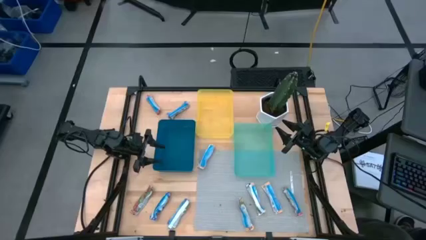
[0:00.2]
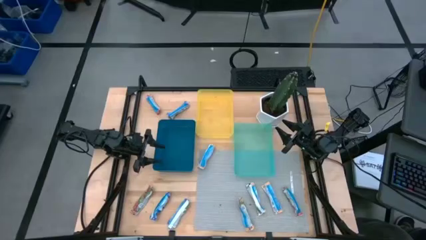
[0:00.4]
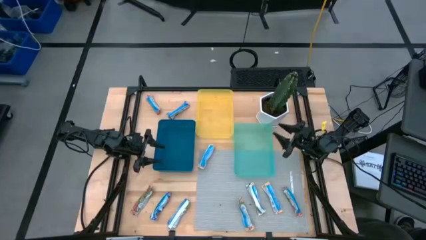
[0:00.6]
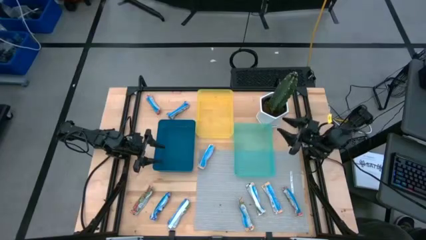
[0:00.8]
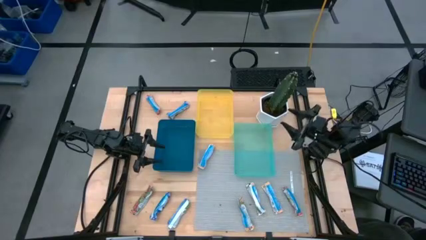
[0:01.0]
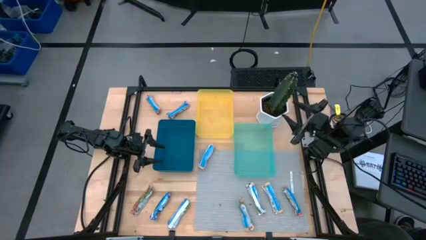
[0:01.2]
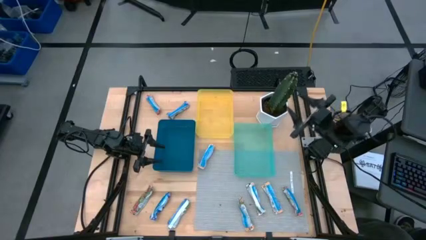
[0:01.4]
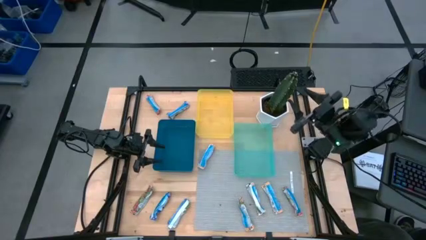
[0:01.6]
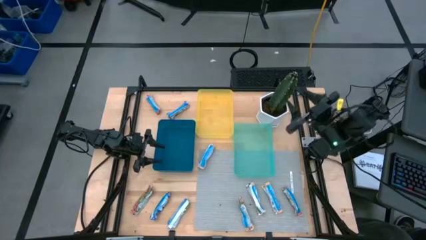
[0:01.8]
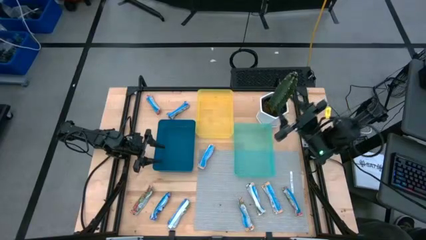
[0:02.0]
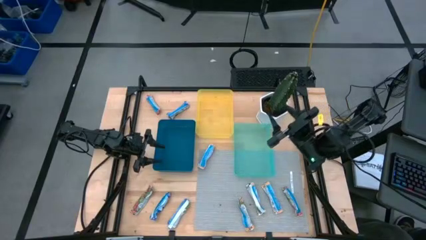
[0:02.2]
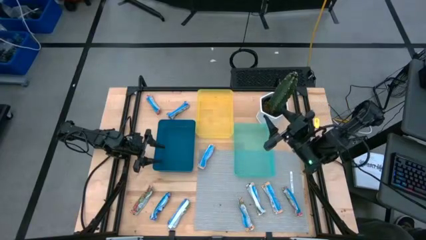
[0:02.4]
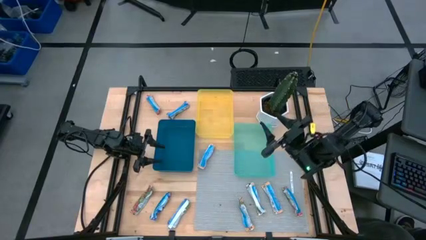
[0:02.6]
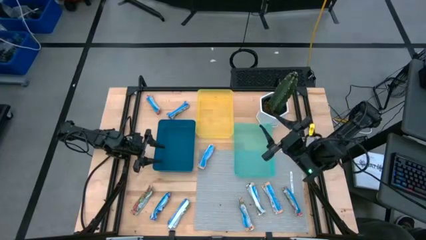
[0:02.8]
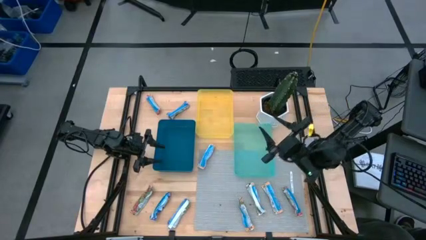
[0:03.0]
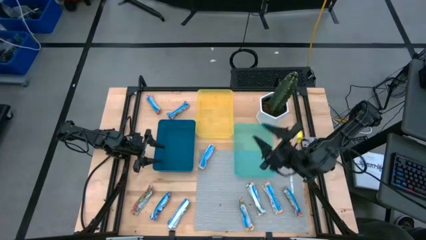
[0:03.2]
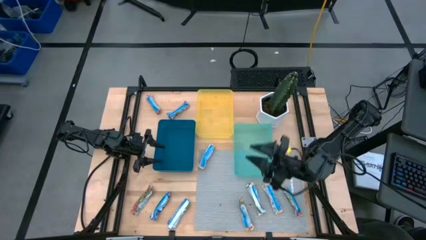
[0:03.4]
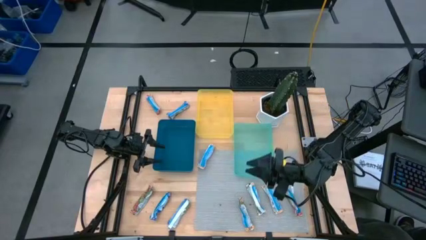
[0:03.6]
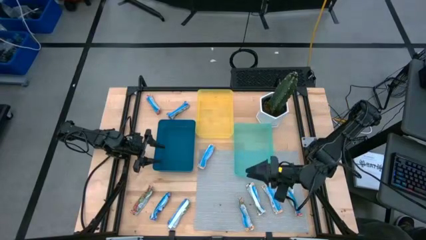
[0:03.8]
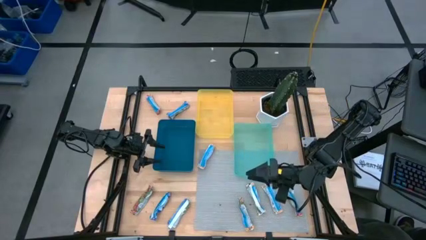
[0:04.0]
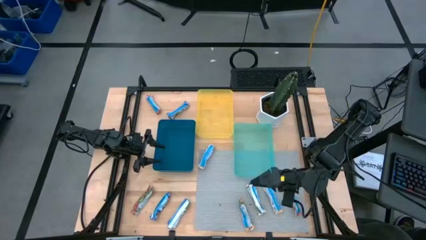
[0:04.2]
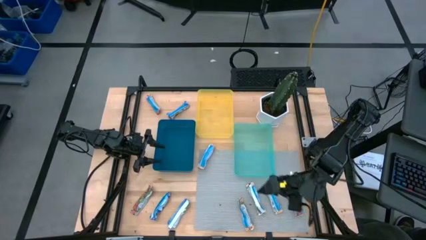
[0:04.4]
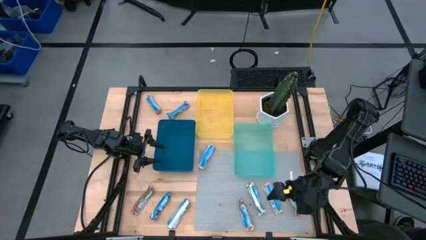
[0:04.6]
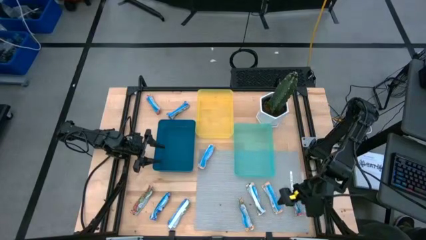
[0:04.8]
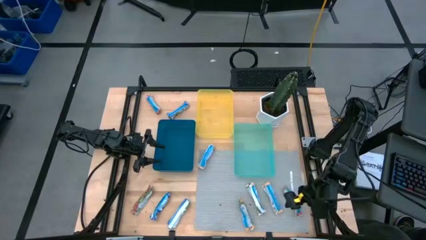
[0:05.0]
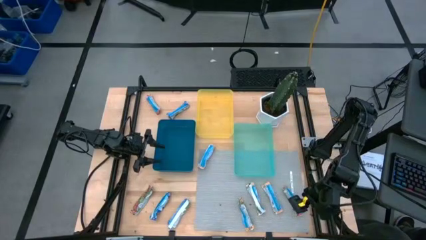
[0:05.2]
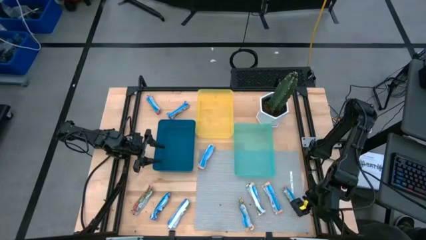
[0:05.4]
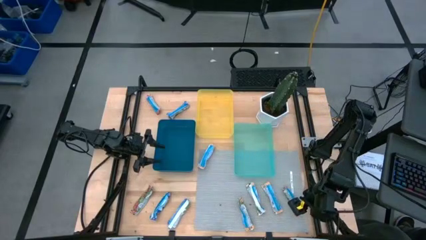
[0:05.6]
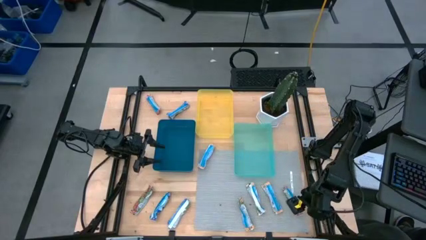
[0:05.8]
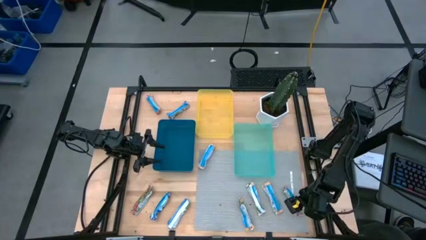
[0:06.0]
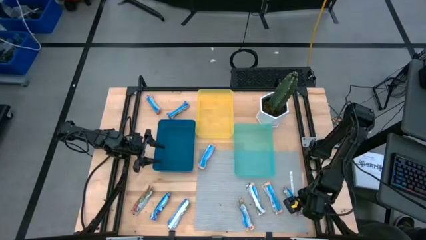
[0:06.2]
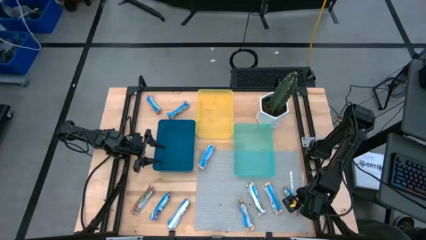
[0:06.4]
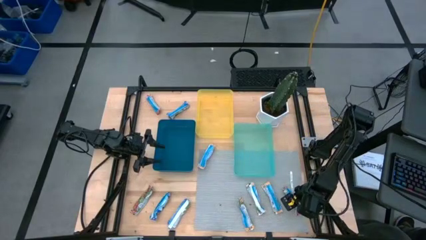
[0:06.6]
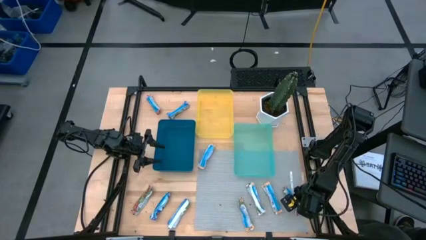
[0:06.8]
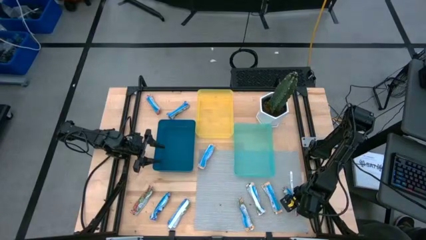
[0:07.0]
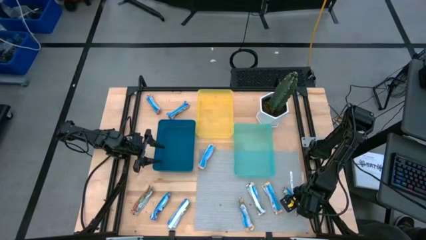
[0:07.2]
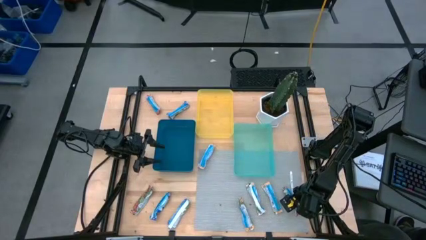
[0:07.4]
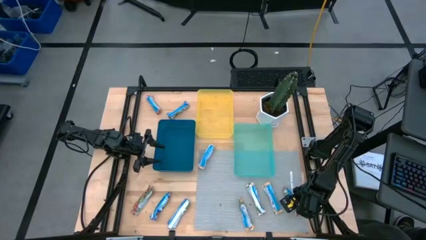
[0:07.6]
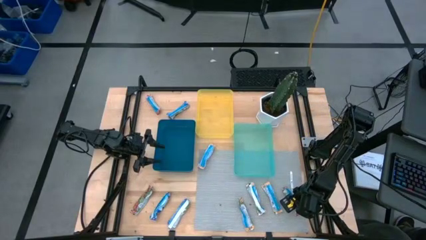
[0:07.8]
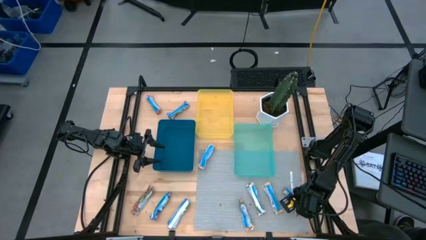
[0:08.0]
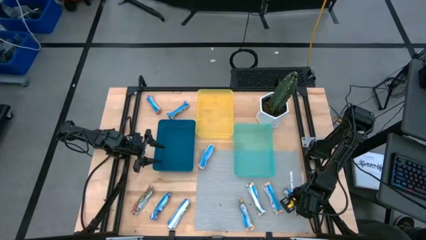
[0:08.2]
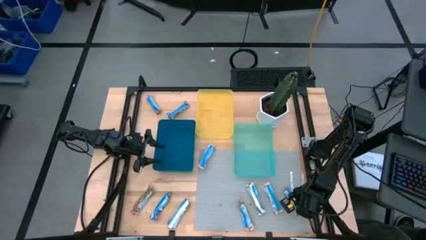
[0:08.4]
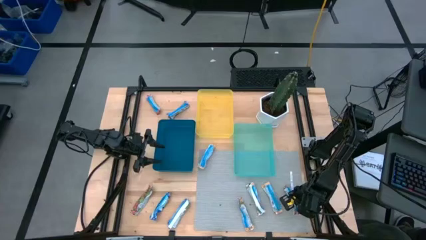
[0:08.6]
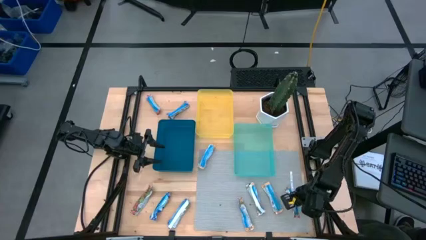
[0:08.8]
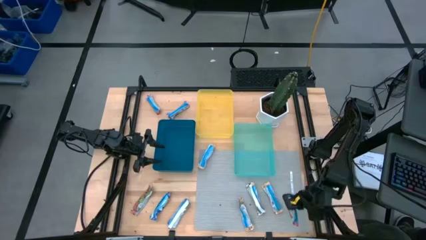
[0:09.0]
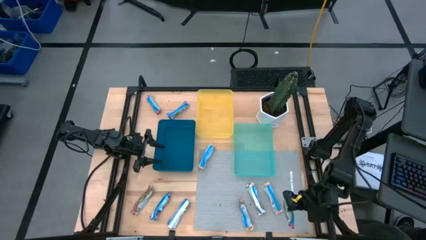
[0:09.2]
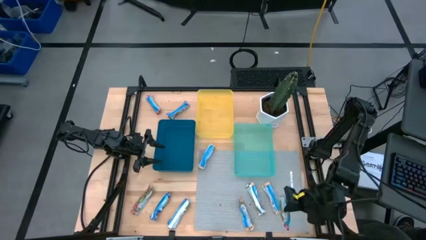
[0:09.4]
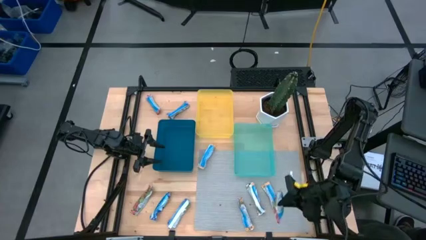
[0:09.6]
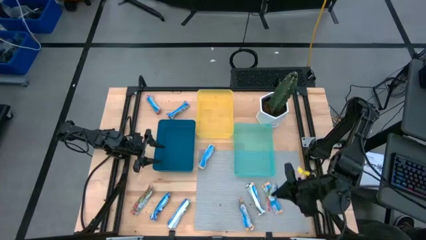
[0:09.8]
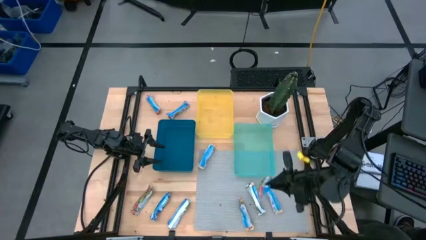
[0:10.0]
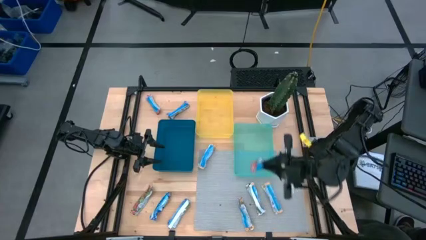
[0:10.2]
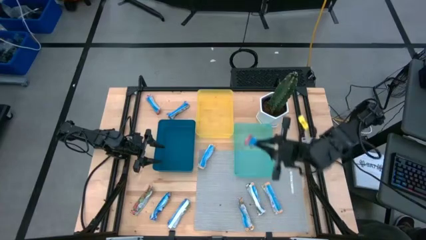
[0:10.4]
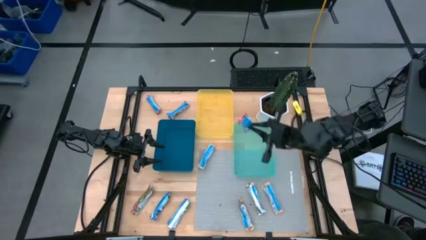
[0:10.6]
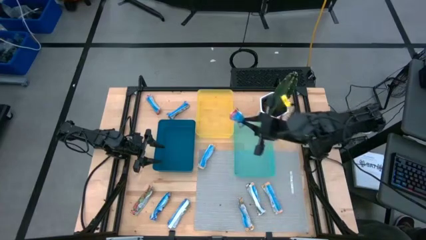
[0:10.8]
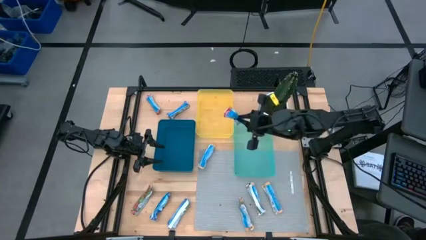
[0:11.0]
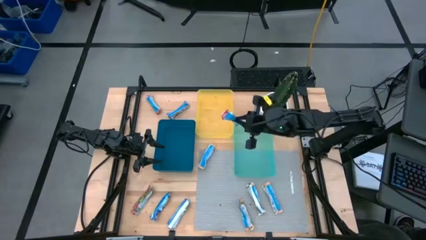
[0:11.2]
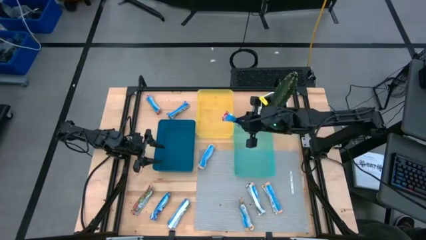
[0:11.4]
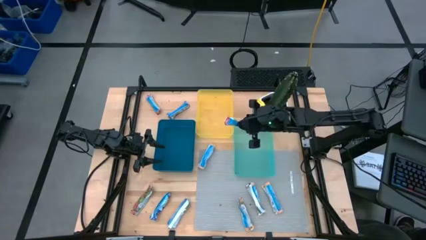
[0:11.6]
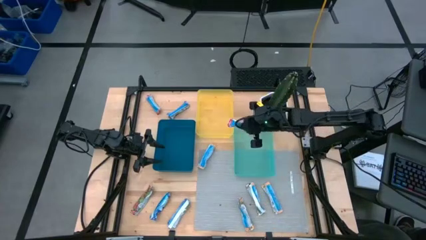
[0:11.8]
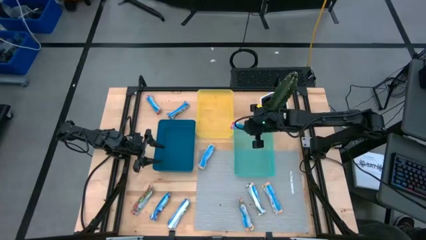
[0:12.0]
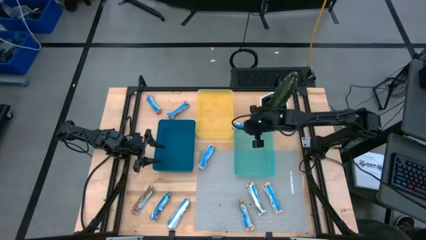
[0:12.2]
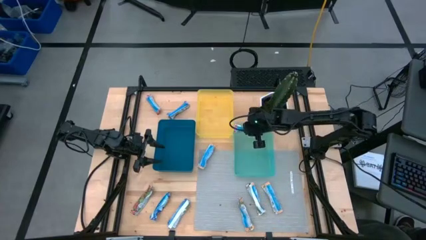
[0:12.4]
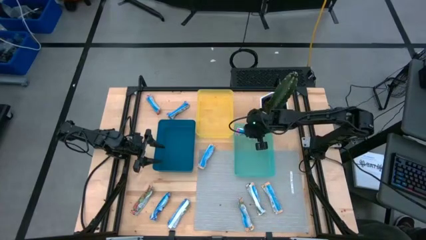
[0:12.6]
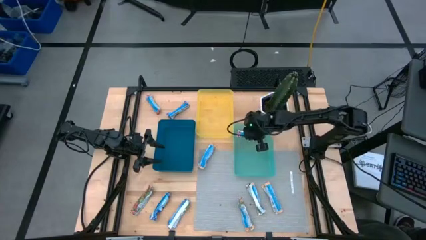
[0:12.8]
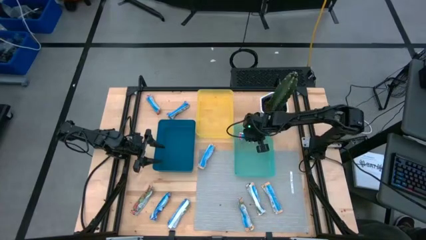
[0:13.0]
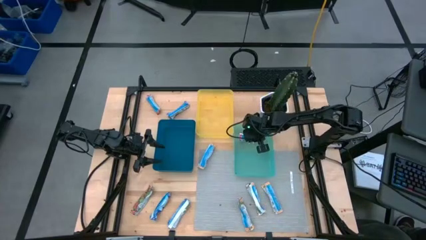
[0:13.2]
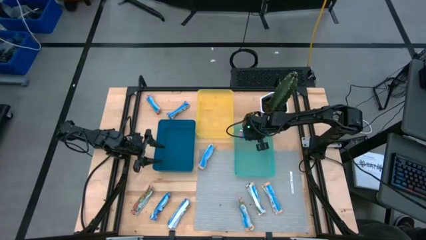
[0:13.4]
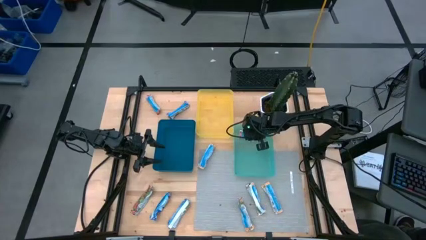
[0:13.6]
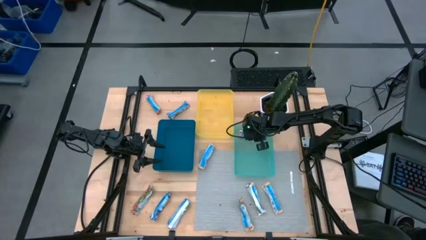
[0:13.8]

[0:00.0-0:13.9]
Task: Pick and place Granola Bars by type
Put the red granola bar into the green bin
